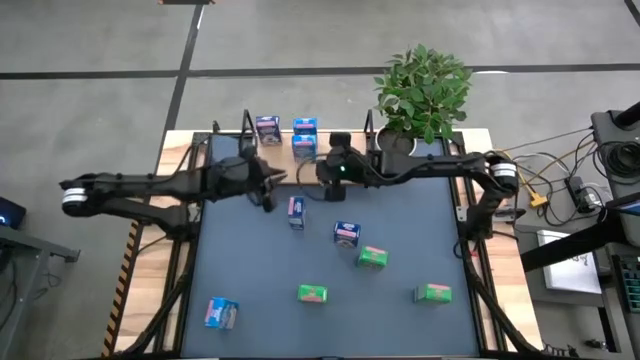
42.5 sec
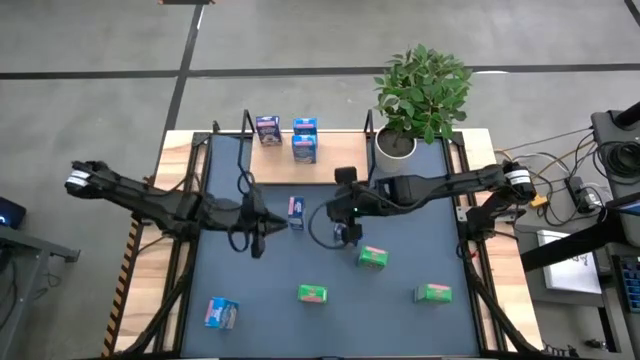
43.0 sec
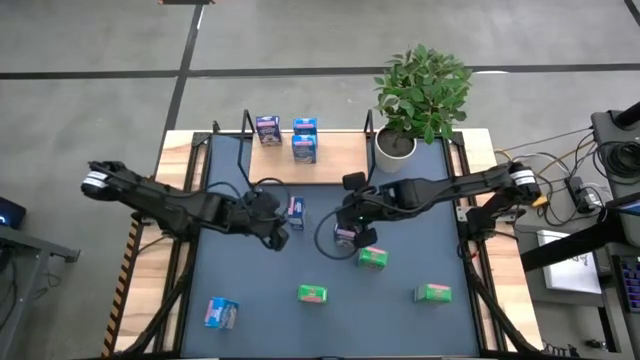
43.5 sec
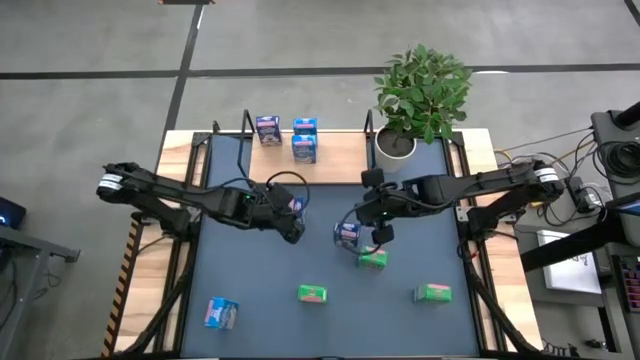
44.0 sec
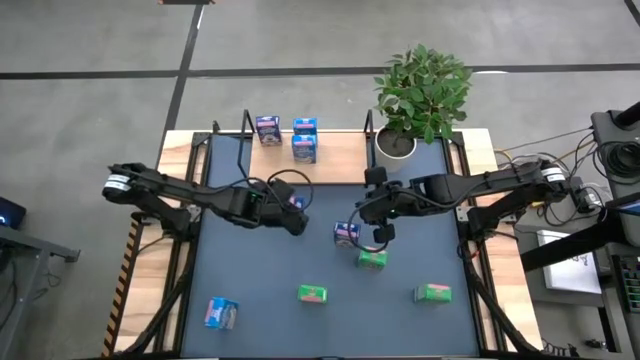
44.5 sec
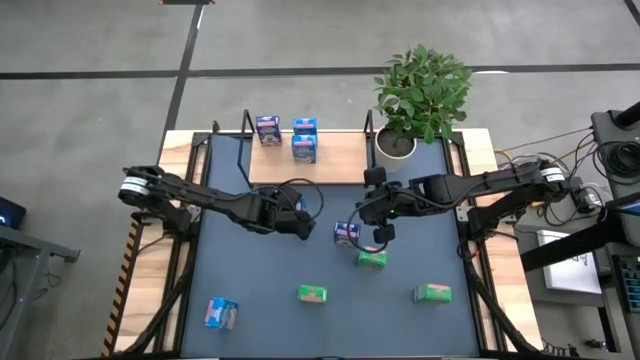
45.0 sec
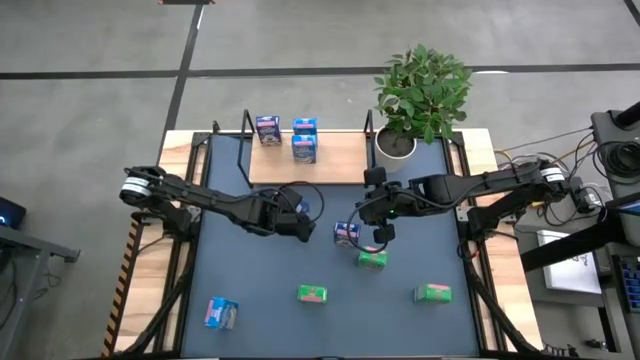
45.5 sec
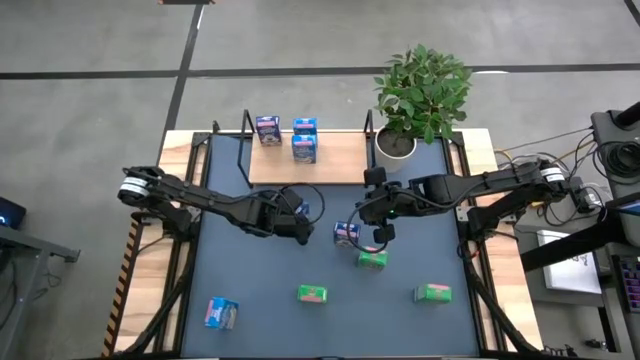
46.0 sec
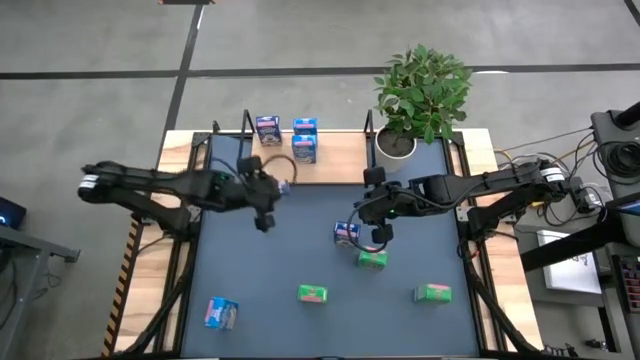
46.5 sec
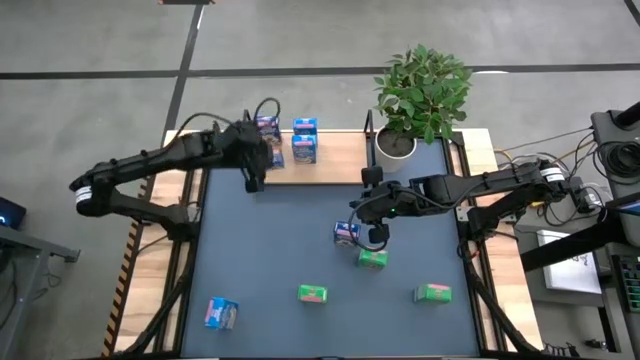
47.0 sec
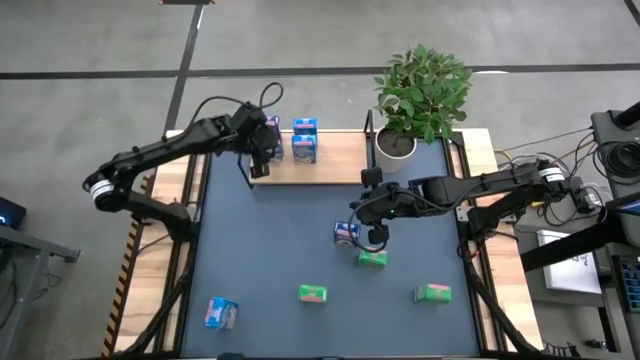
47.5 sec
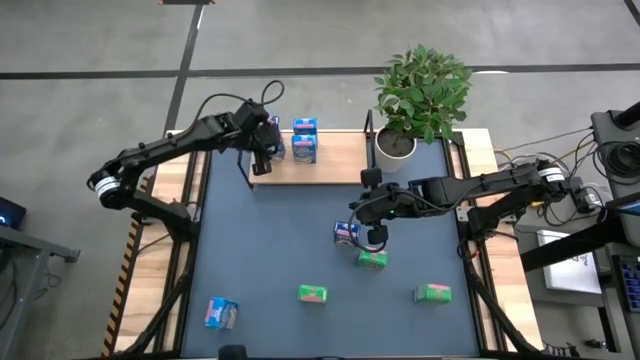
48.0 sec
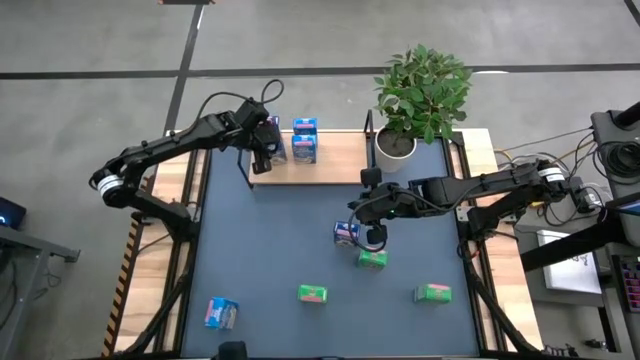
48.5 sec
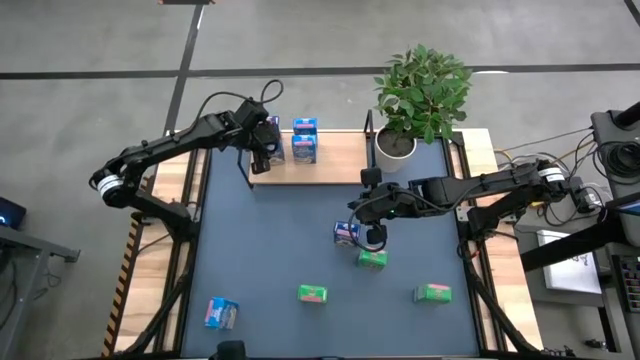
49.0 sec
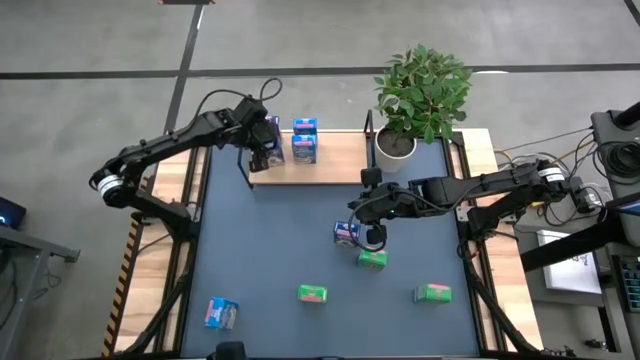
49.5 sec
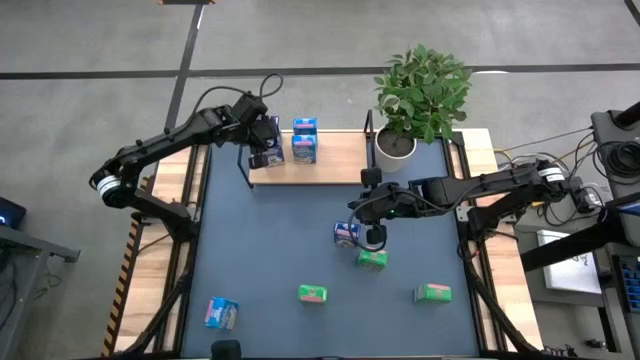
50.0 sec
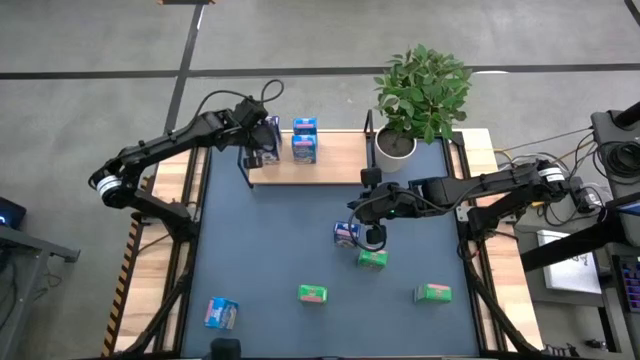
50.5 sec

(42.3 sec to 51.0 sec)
Task: Stack cereal on shelf
Put the left blue cereal box on the shelf aligned with the other blue cereal box

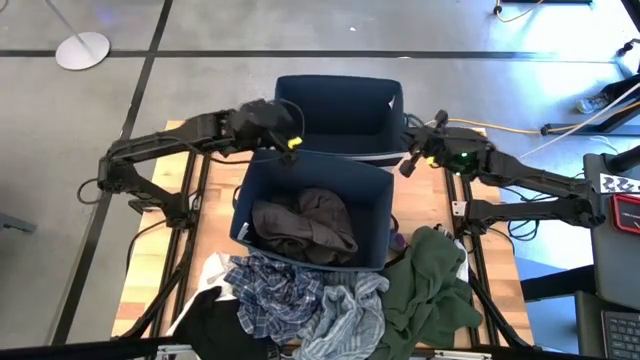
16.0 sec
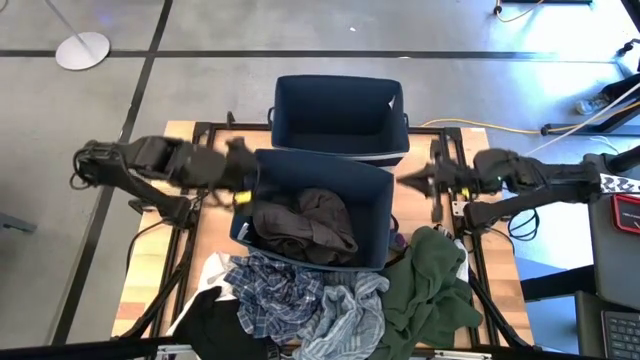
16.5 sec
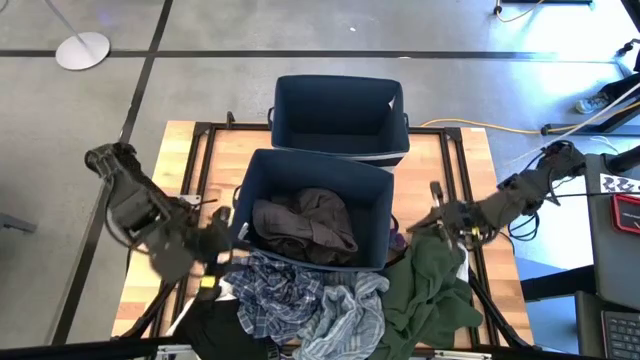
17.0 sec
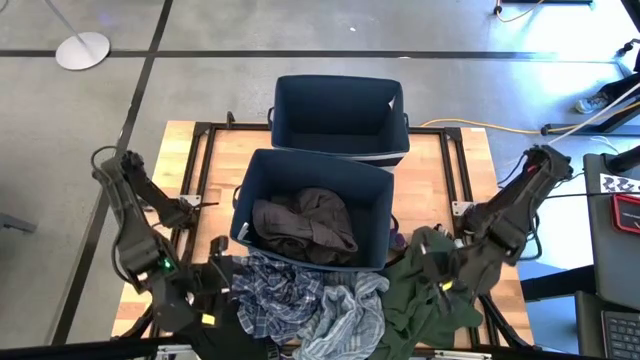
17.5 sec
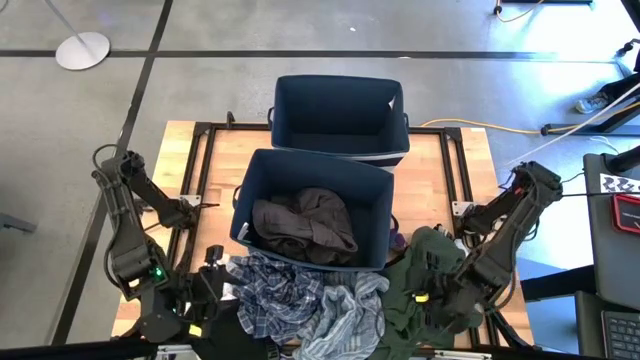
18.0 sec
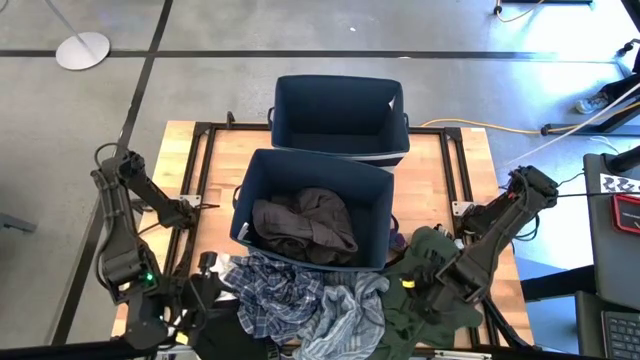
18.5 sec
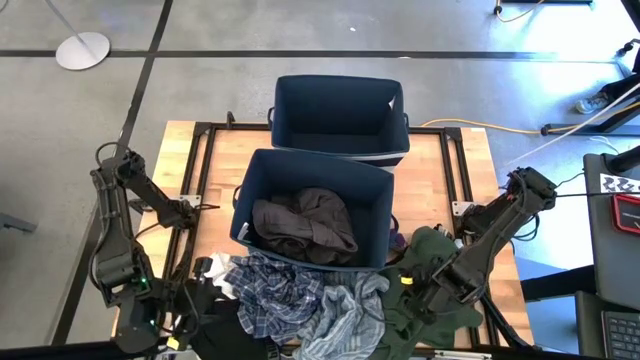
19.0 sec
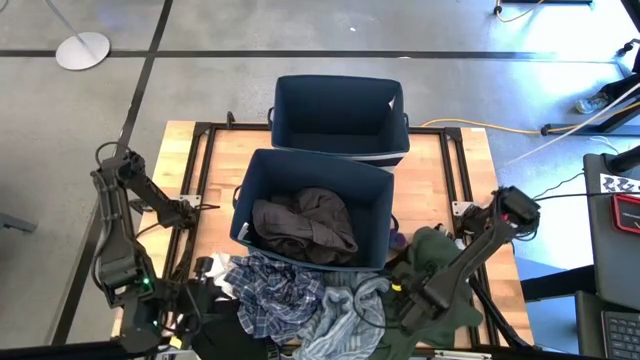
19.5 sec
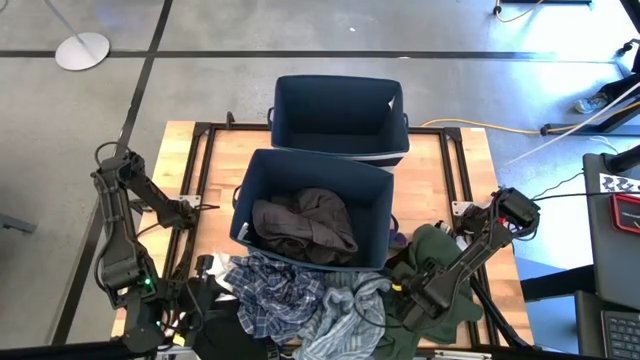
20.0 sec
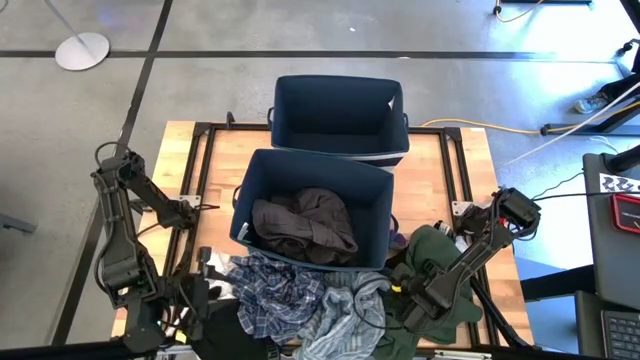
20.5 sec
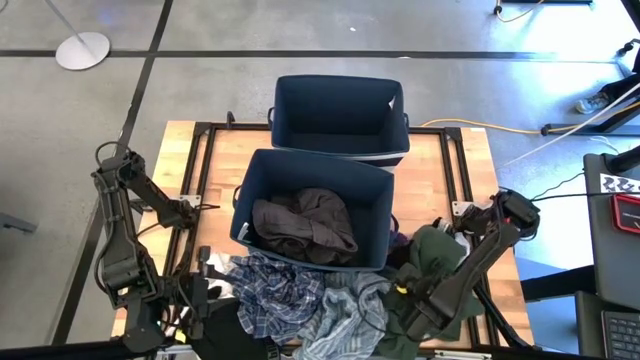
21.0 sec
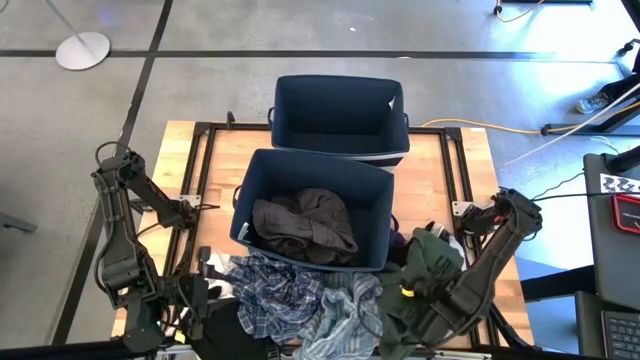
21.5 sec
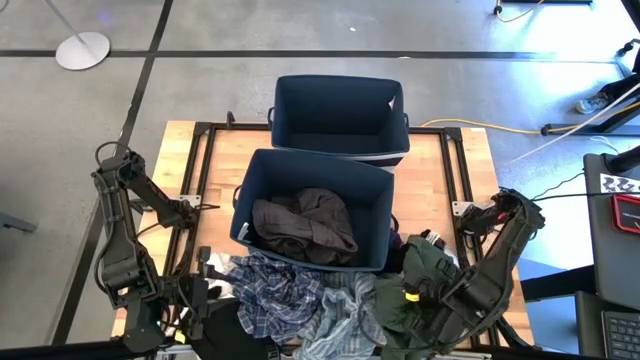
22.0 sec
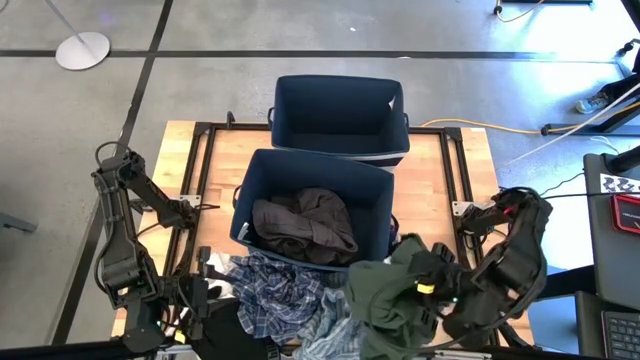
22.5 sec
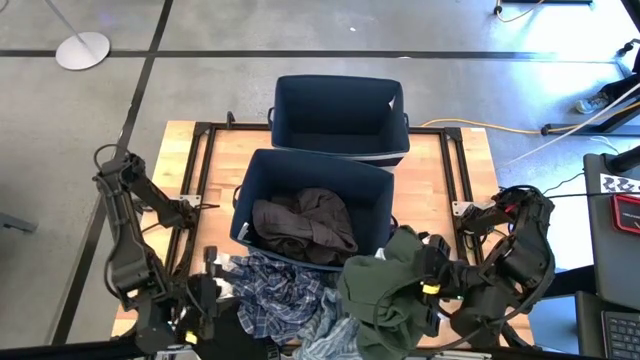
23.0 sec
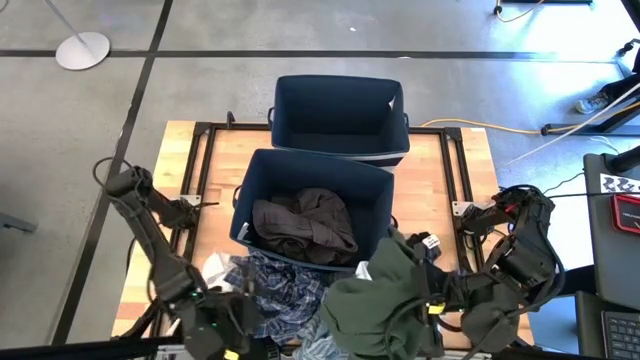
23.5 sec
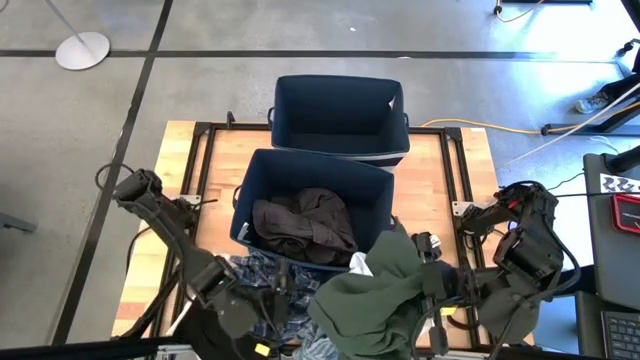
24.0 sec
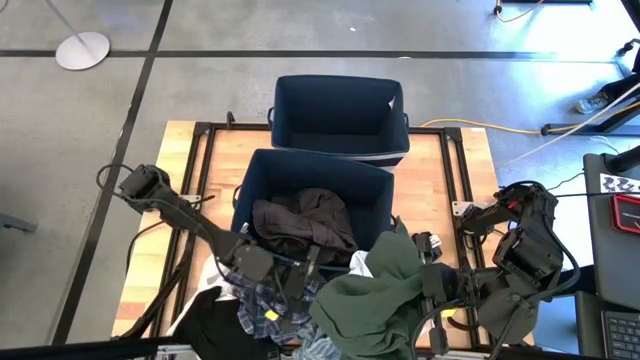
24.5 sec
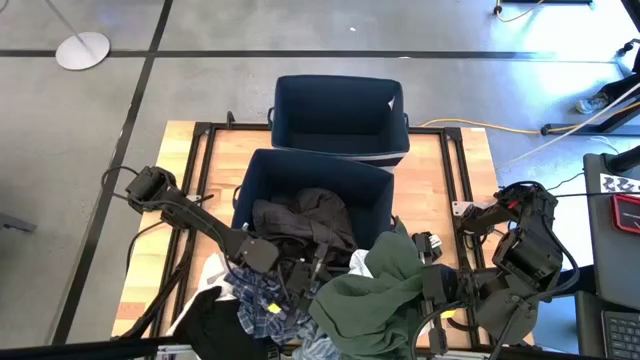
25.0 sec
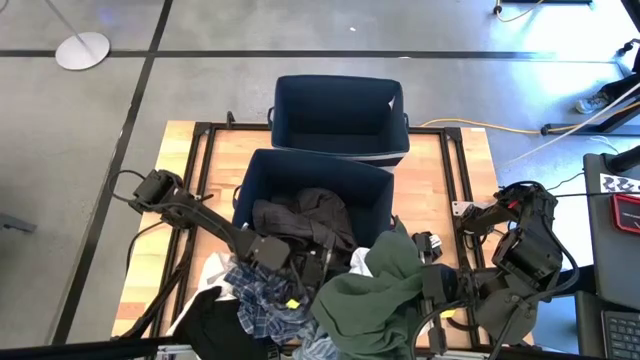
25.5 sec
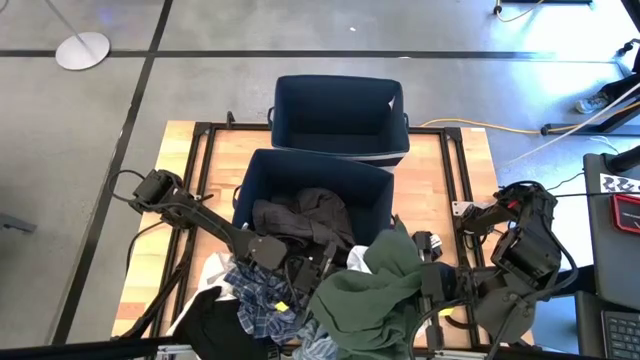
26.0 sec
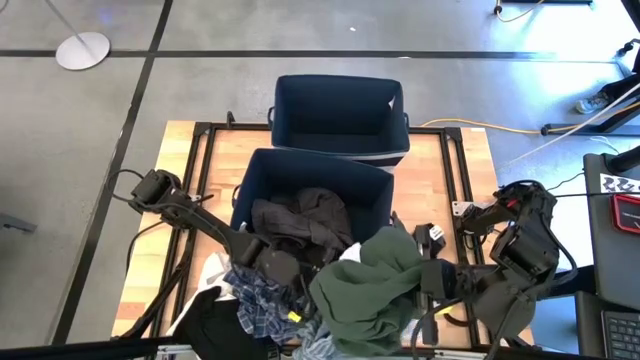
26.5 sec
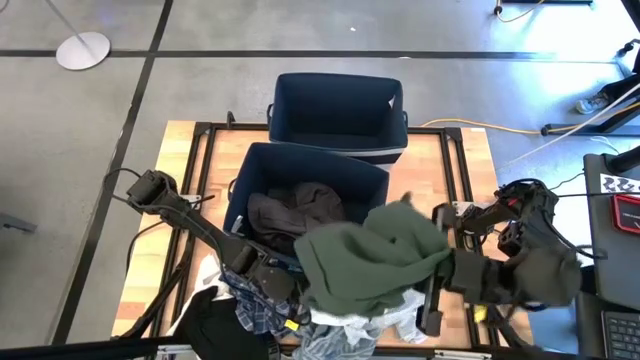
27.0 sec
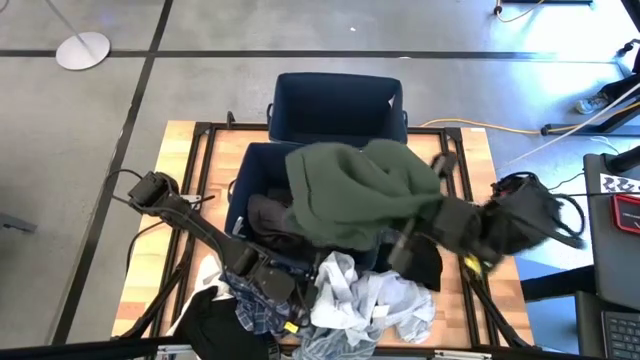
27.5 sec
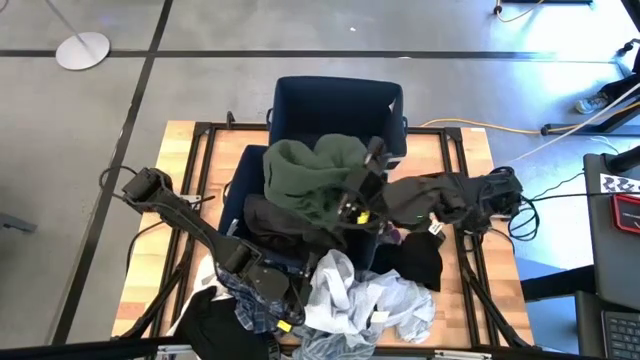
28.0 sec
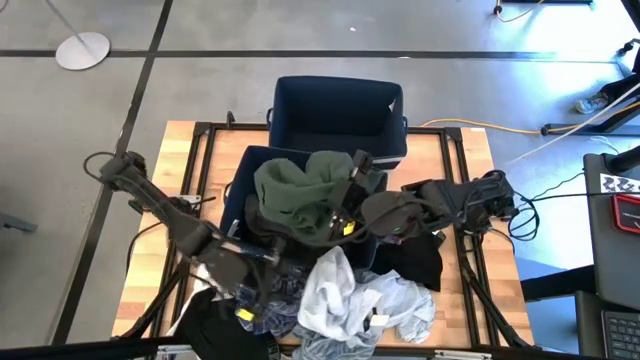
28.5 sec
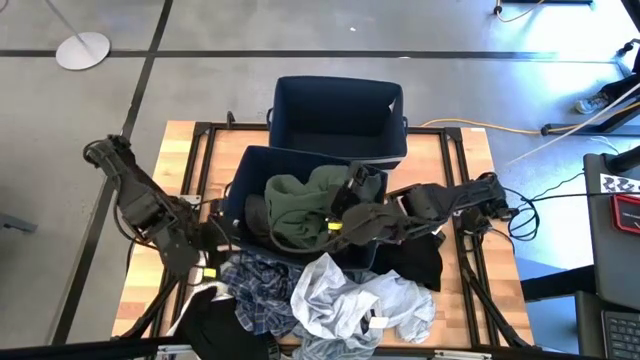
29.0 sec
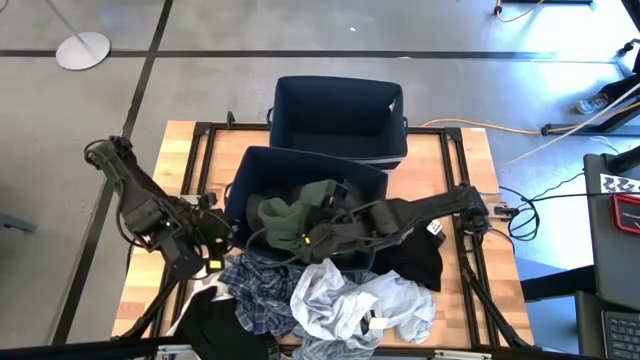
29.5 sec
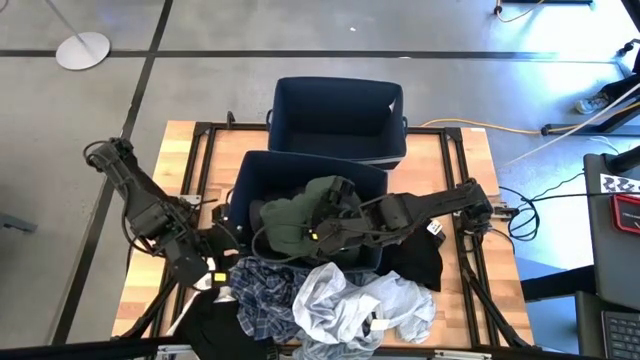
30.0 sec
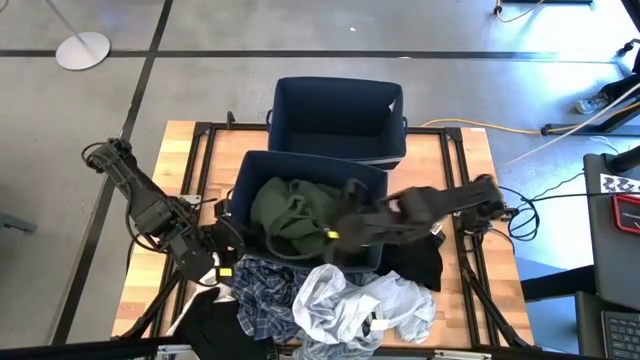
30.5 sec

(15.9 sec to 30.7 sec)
Task: Sort clothes
Put the green shorts into the bottom blue laundry bin
